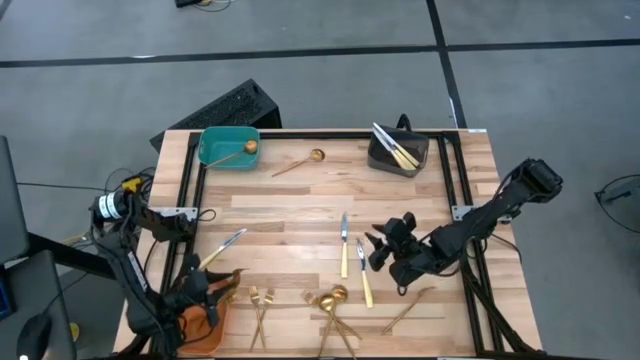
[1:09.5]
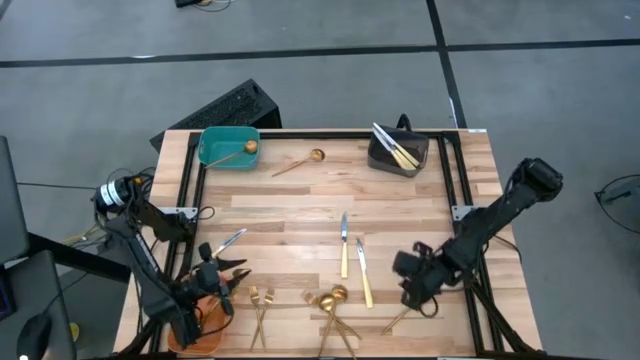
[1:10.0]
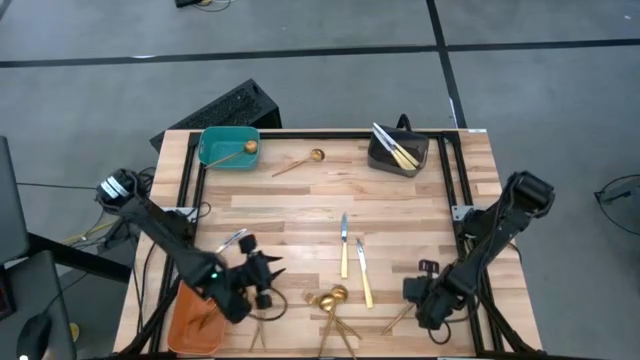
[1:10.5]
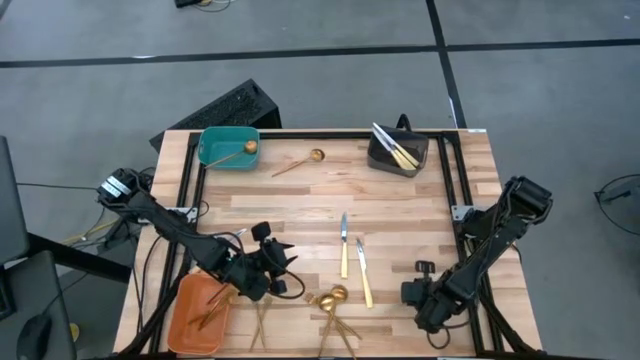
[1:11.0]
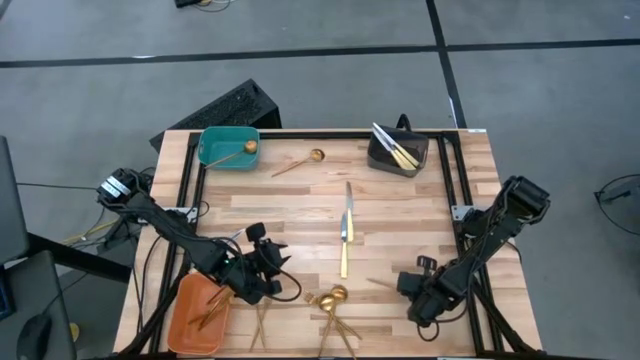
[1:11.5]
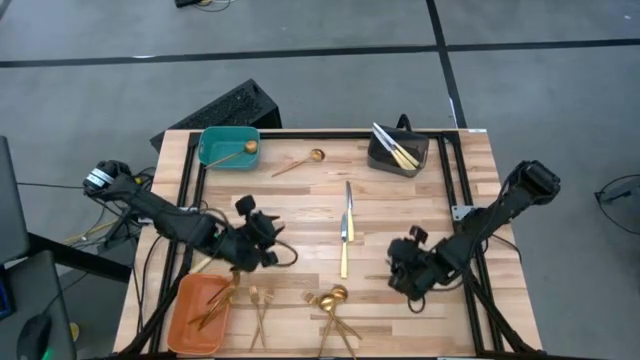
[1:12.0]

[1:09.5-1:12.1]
Task: Sort silverware by color (type)
Put the top spoon into the green bin

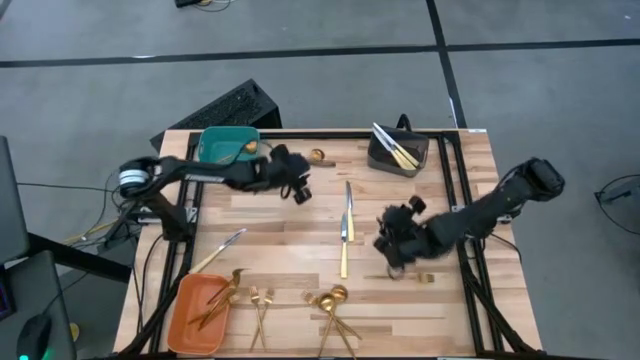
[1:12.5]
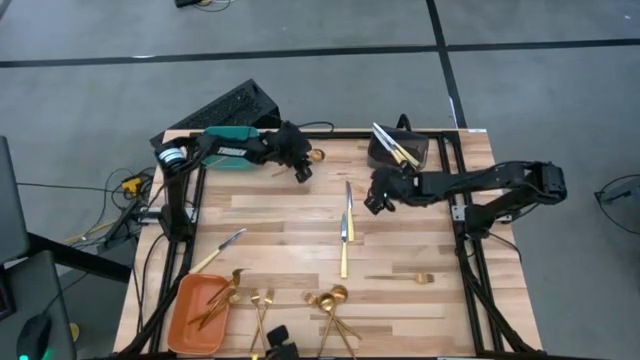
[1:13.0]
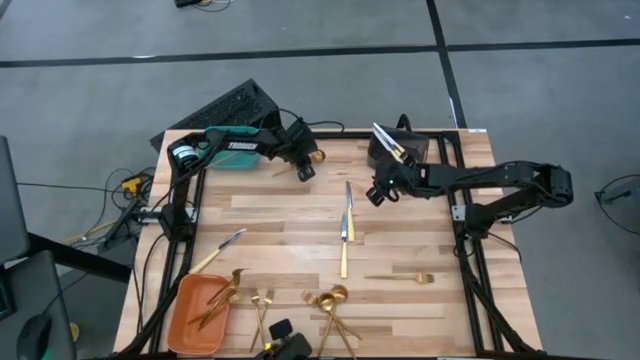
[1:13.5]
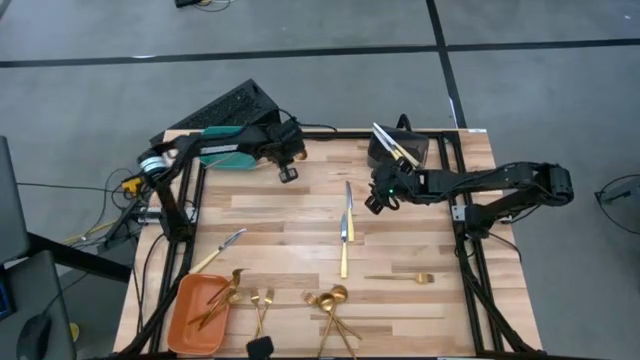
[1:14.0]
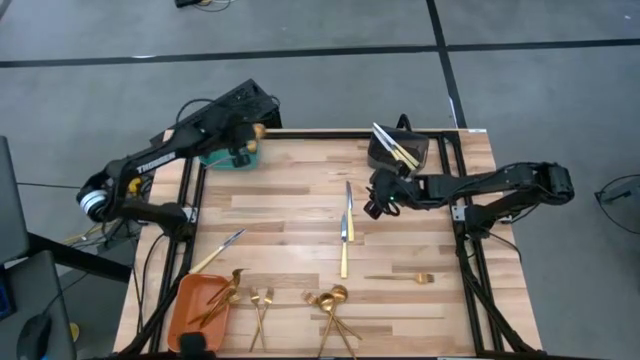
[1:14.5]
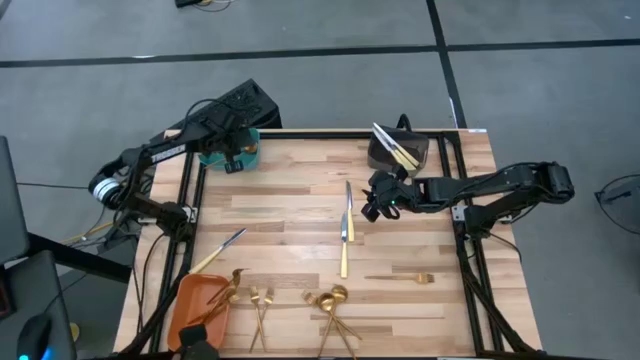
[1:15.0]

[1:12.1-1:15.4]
Put the top spoon into the green bin

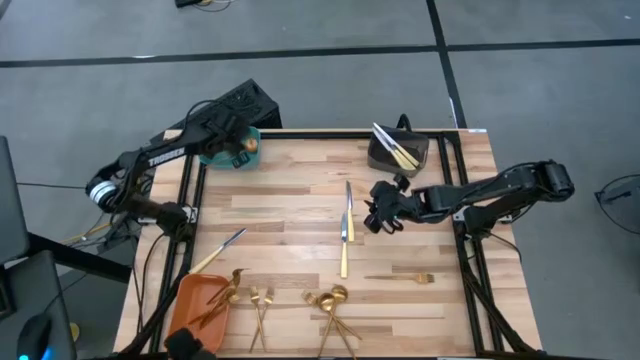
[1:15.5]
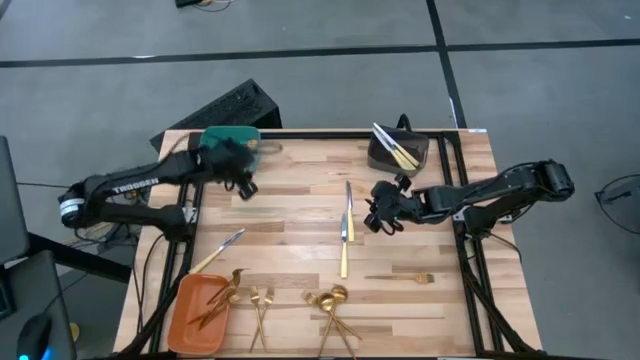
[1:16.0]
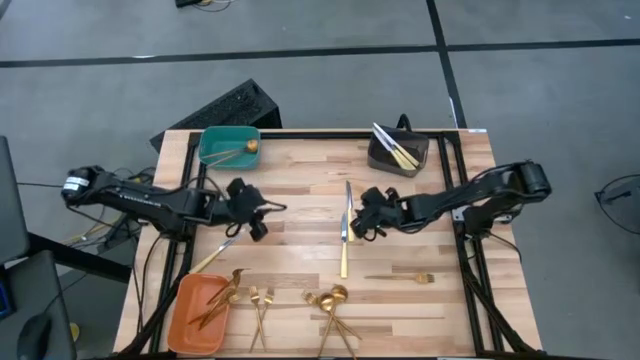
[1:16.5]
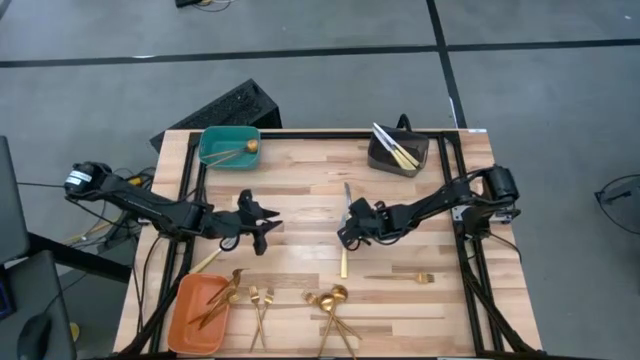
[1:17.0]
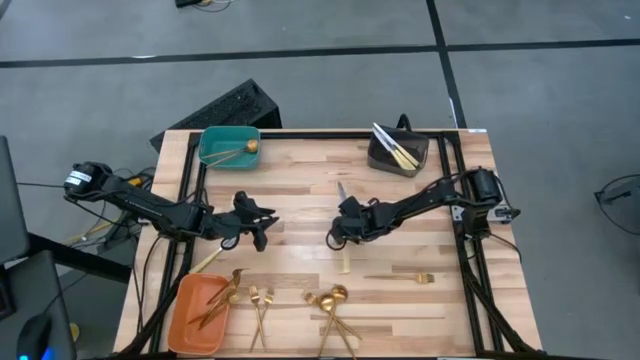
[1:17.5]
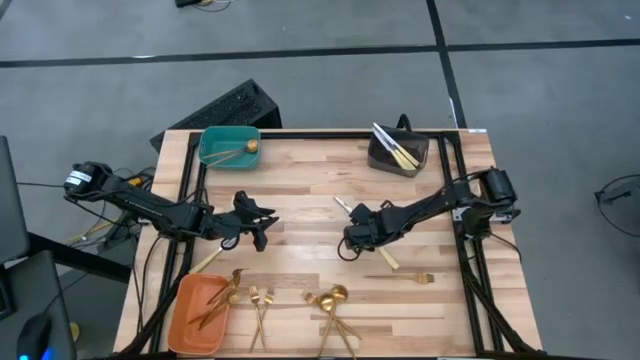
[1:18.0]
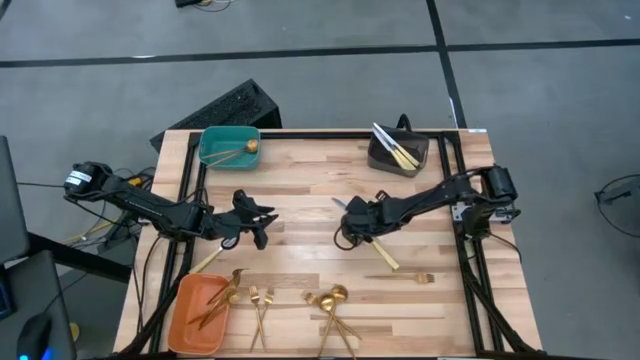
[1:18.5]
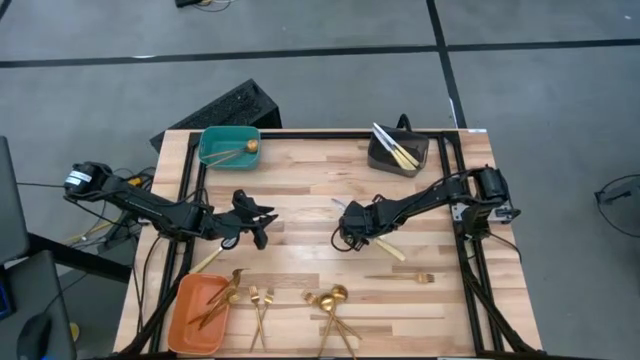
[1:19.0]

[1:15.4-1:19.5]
Put the right knife into the black bin

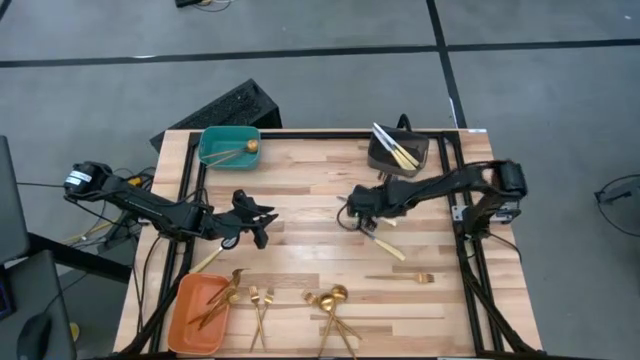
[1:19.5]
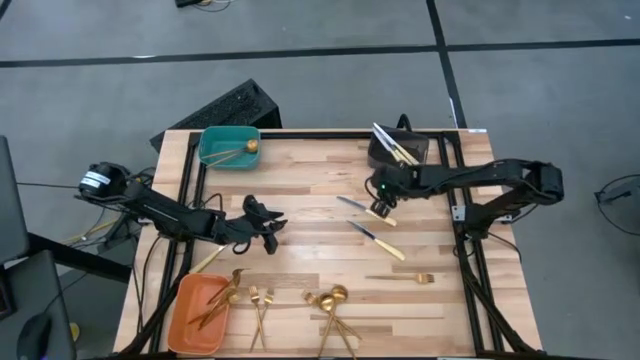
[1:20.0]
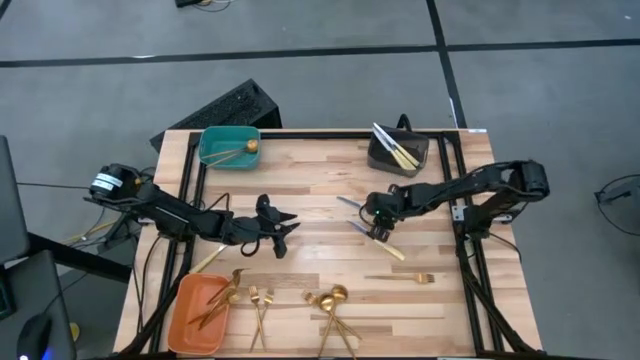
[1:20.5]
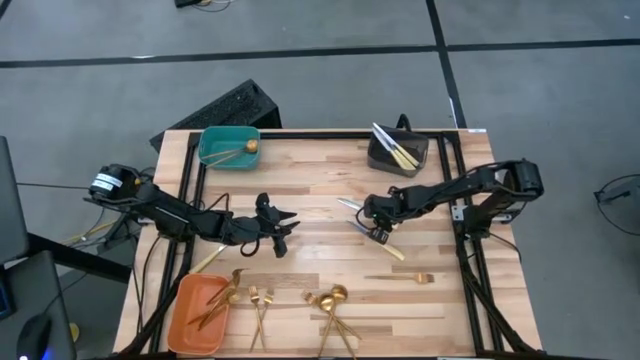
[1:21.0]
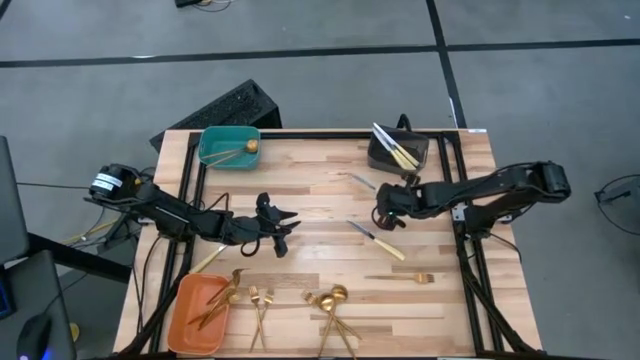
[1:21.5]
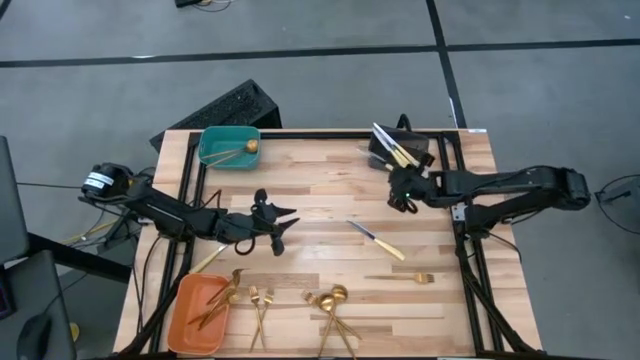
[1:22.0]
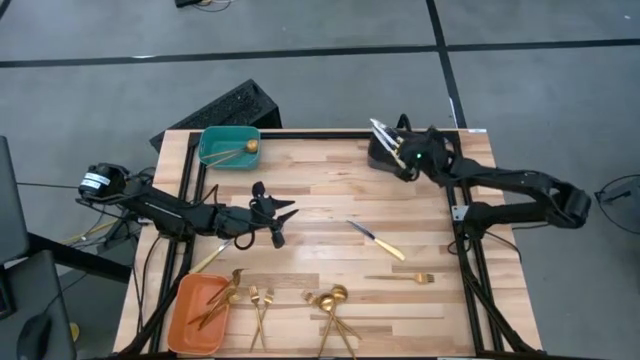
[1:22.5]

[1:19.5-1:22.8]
Put the right knife into the black bin

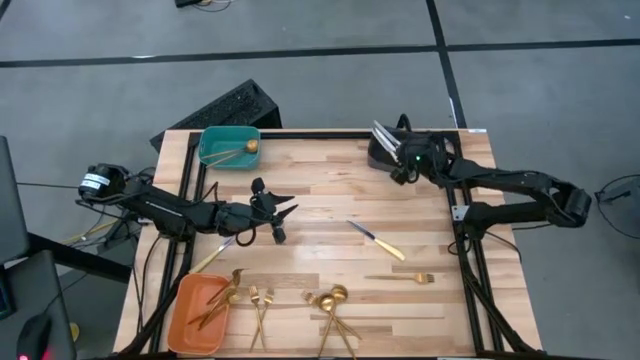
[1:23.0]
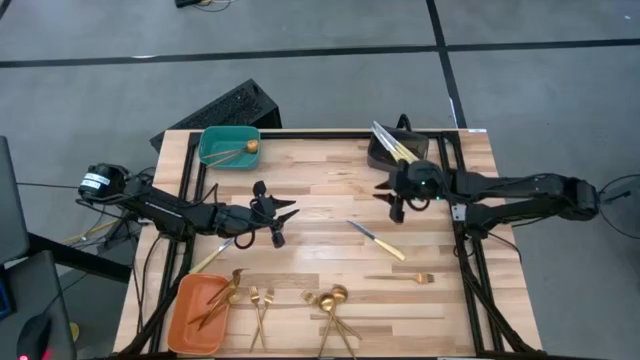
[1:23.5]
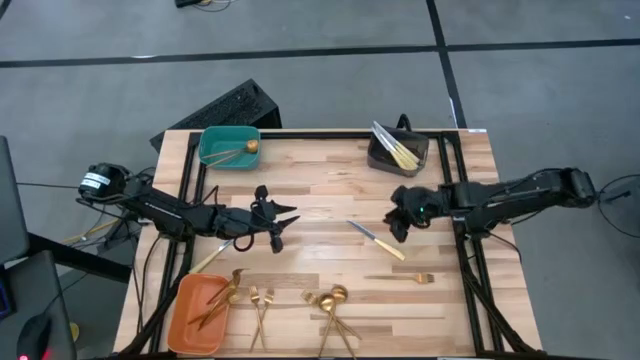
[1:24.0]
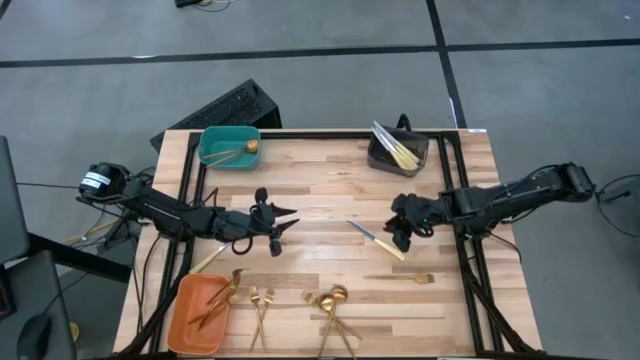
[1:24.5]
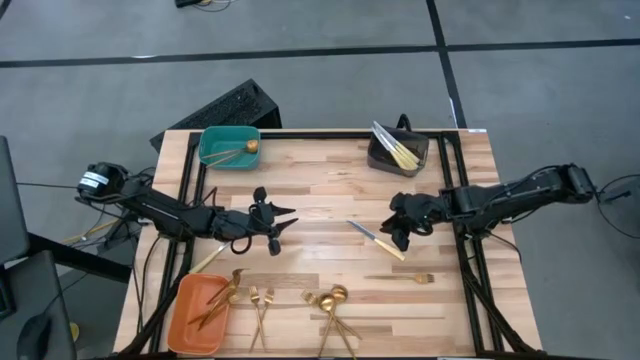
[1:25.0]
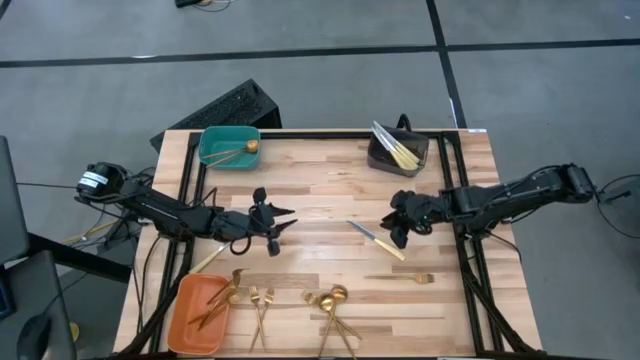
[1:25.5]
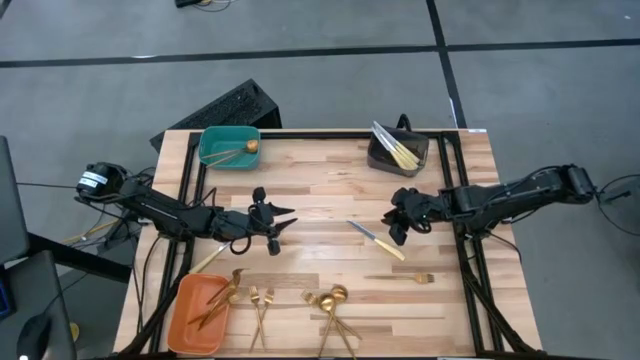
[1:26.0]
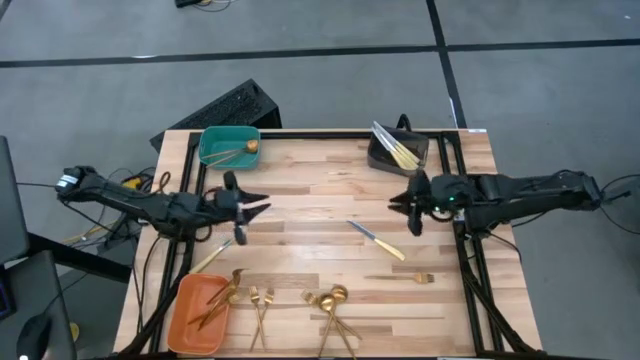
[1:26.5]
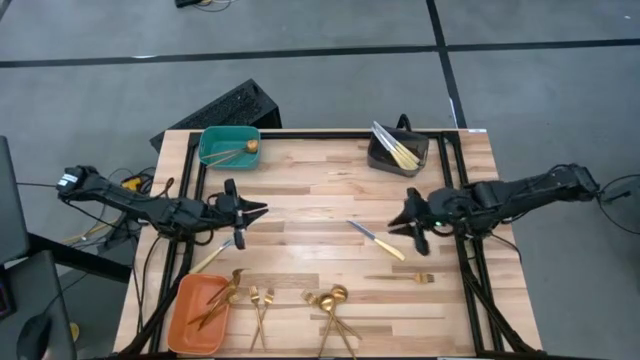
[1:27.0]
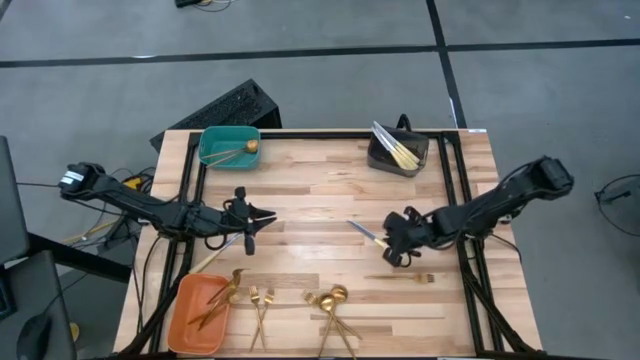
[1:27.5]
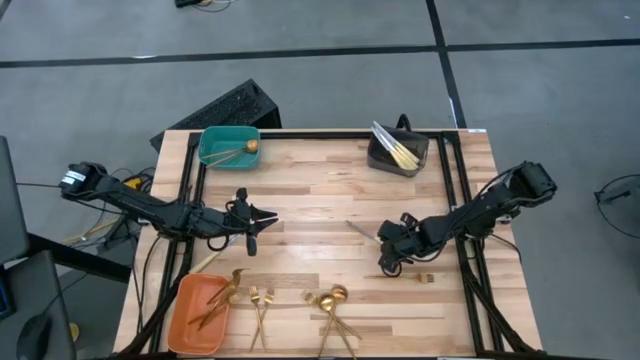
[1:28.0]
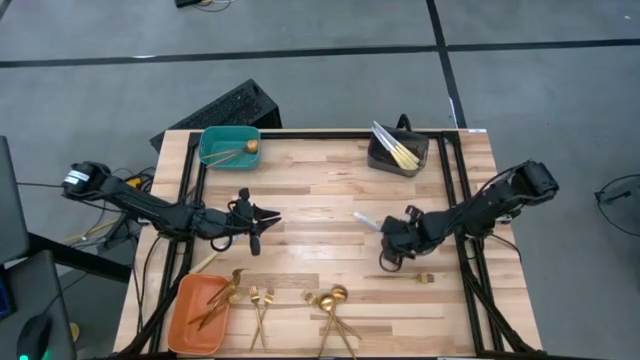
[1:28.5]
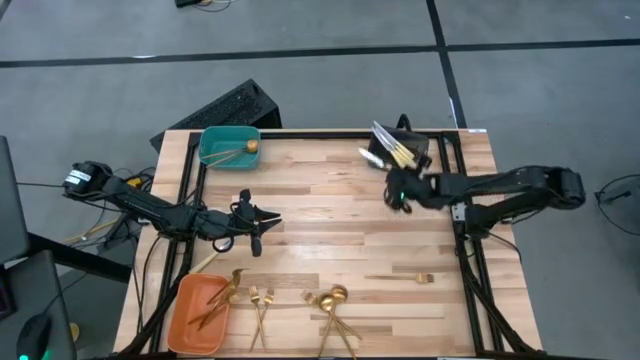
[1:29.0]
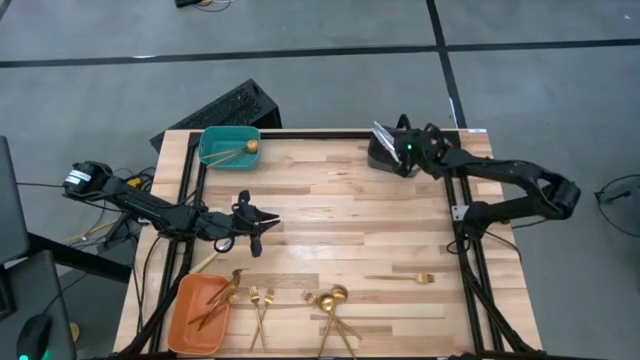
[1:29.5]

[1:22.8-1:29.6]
Put the right knife into the black bin
